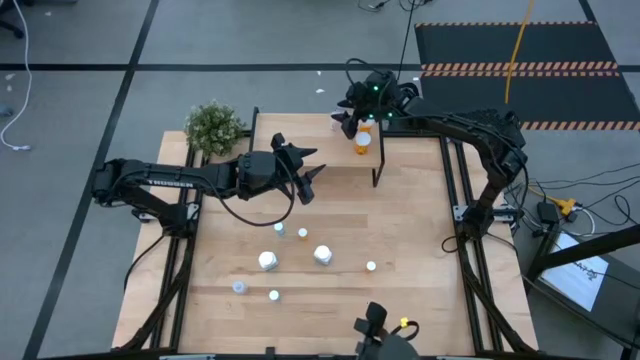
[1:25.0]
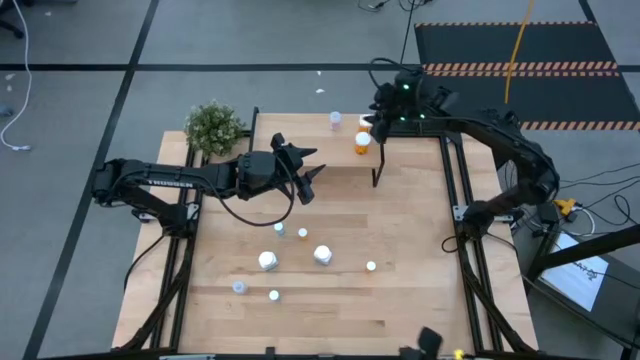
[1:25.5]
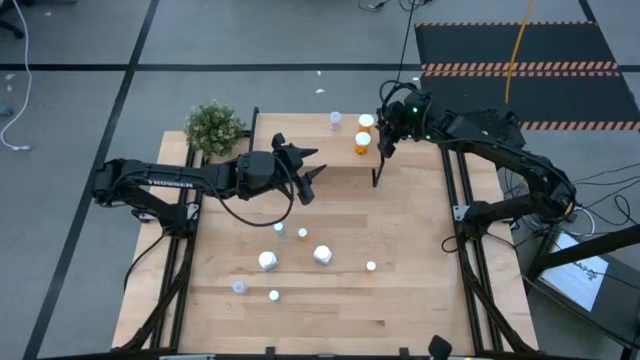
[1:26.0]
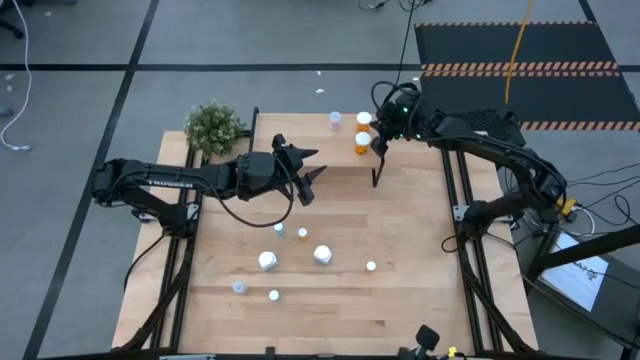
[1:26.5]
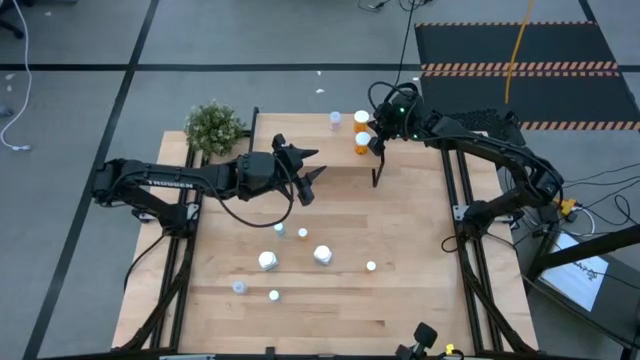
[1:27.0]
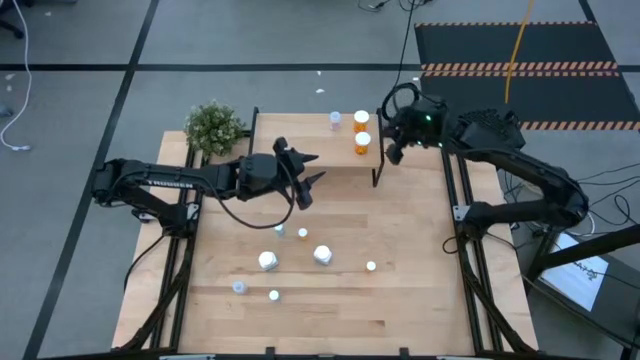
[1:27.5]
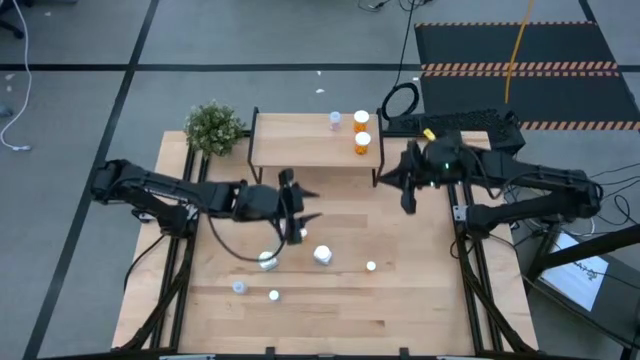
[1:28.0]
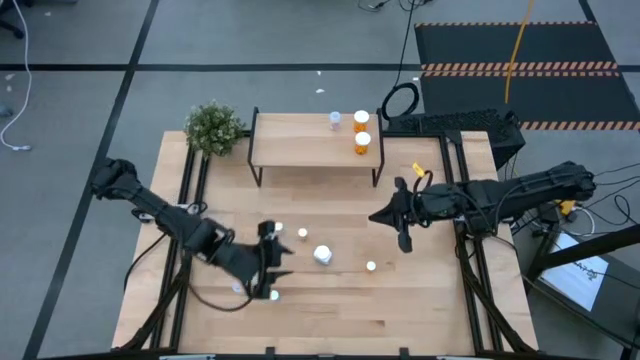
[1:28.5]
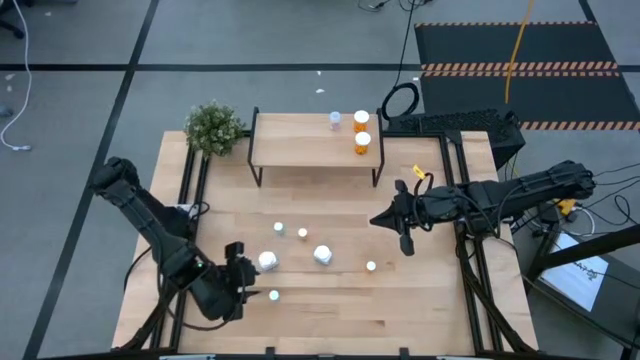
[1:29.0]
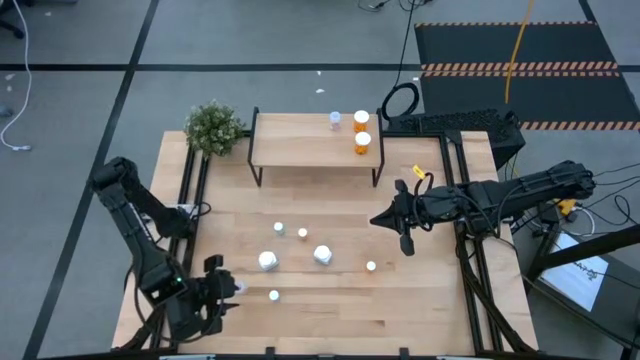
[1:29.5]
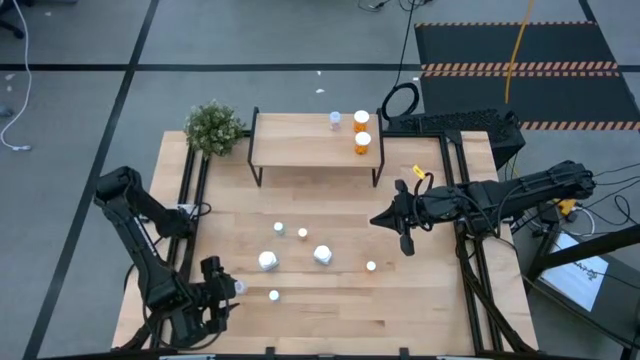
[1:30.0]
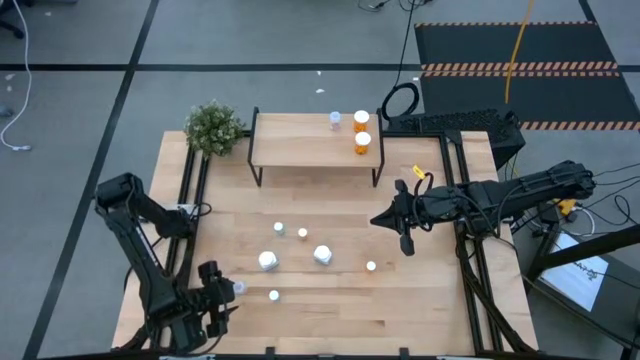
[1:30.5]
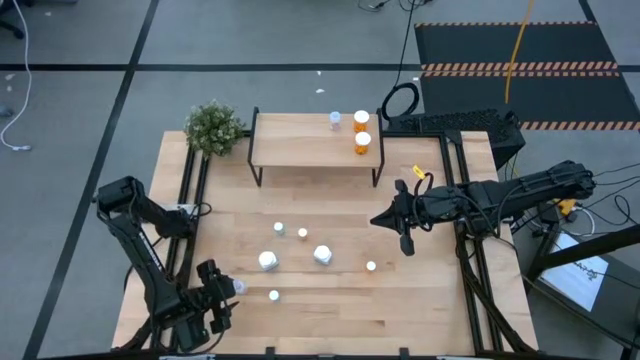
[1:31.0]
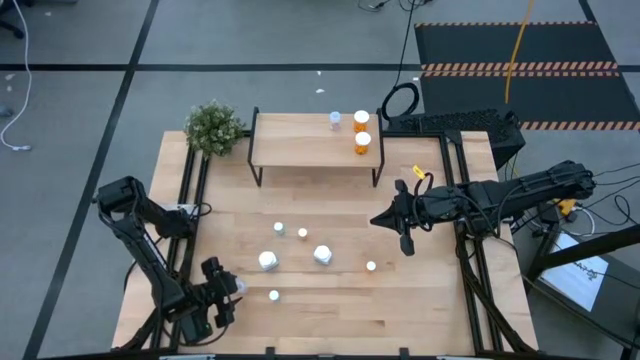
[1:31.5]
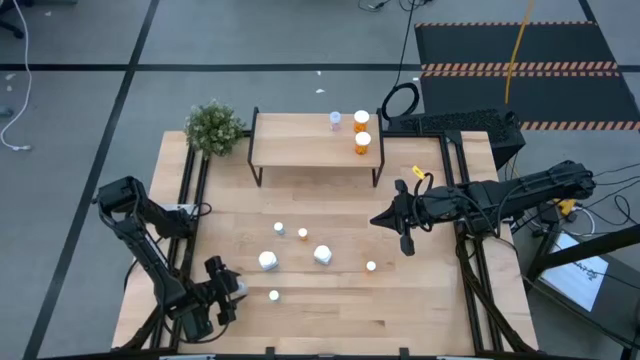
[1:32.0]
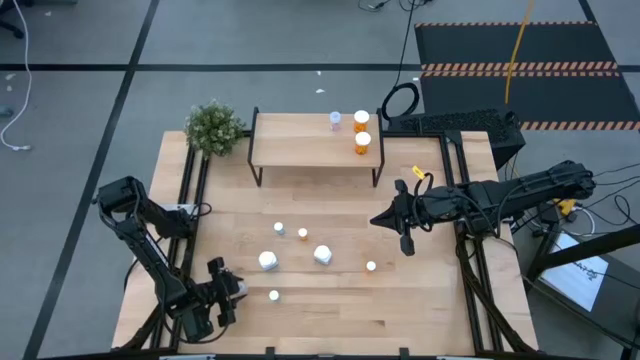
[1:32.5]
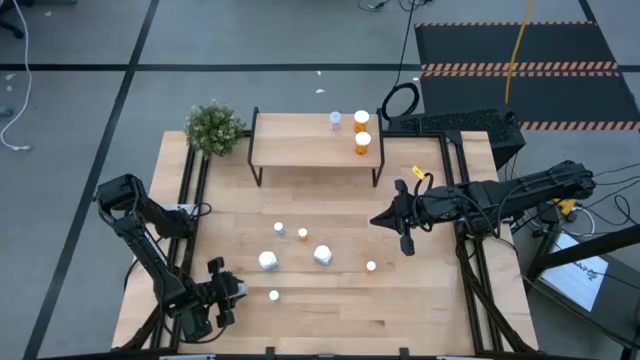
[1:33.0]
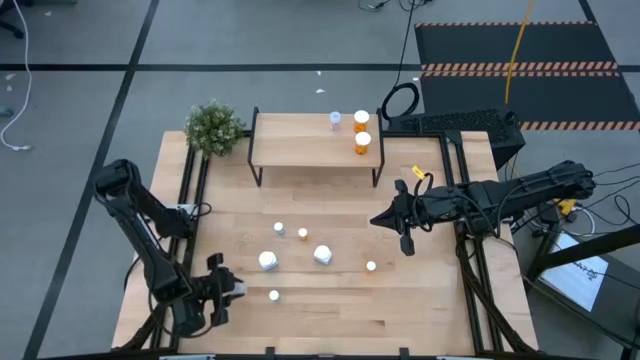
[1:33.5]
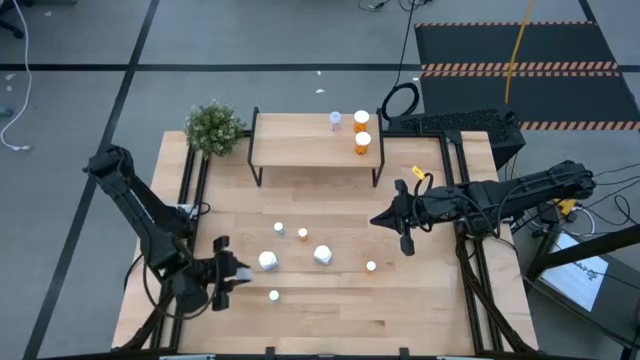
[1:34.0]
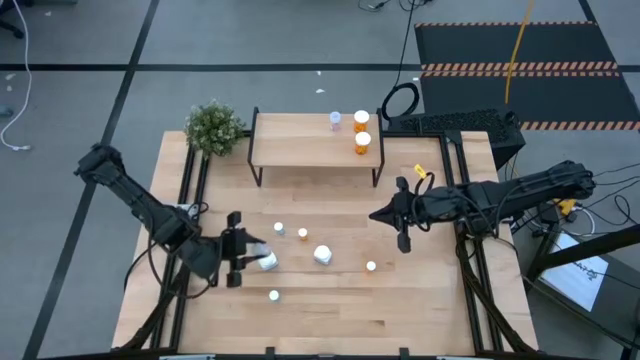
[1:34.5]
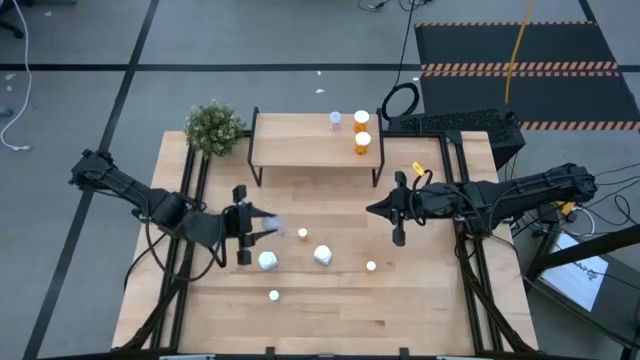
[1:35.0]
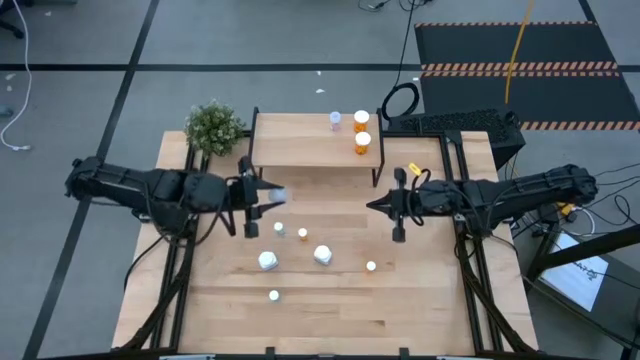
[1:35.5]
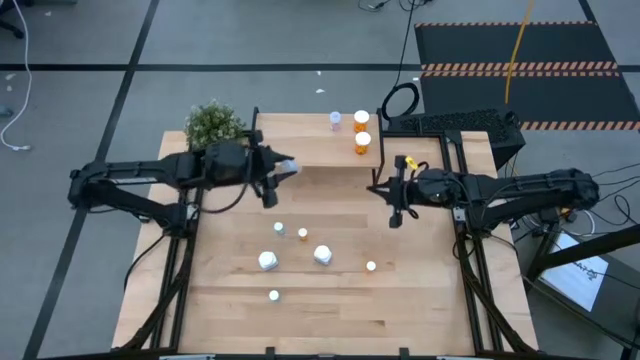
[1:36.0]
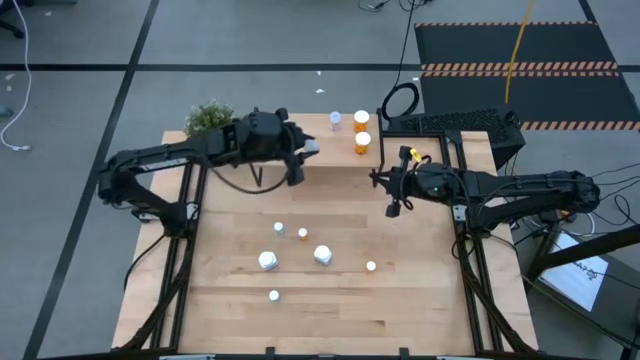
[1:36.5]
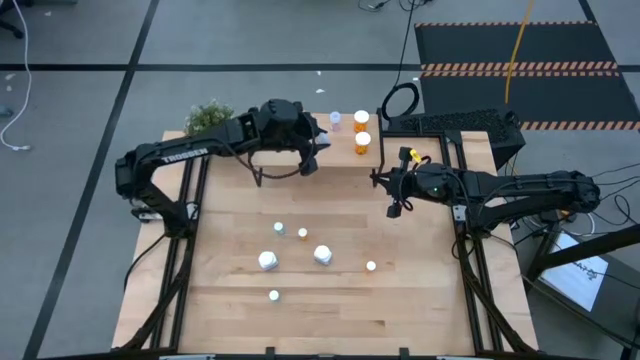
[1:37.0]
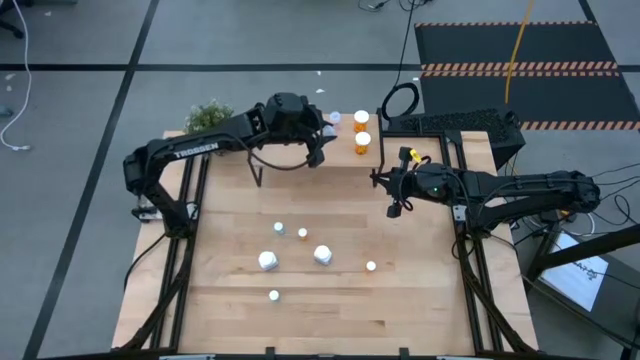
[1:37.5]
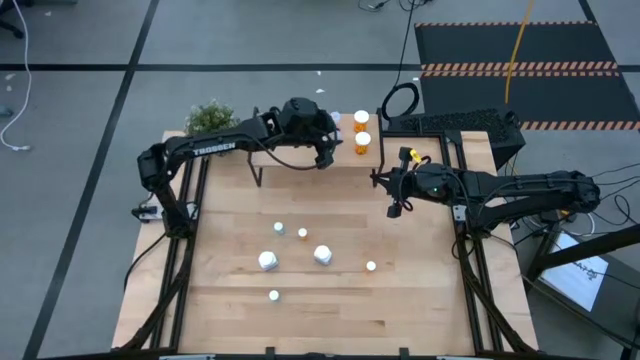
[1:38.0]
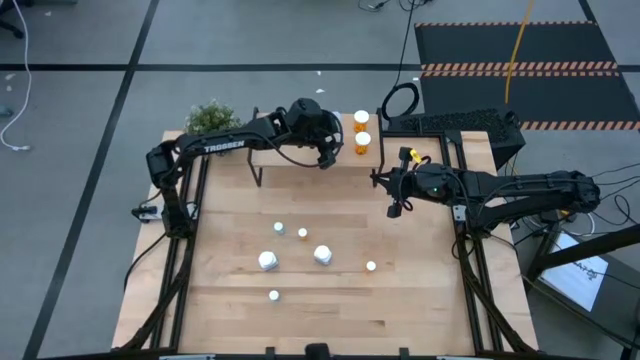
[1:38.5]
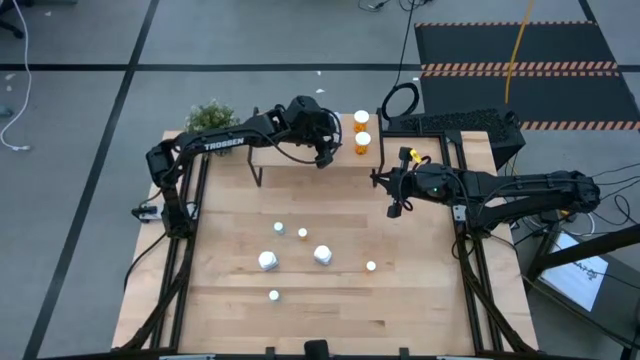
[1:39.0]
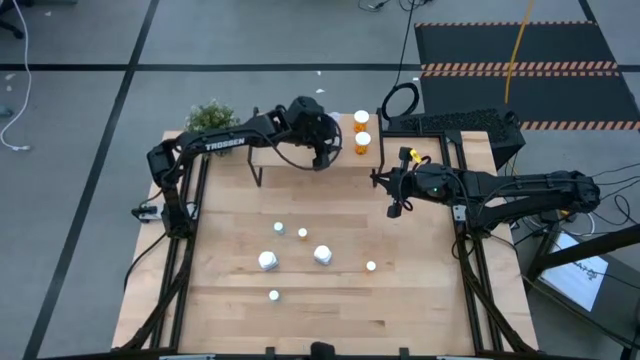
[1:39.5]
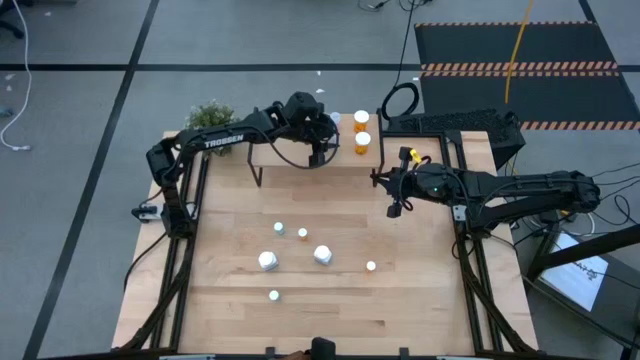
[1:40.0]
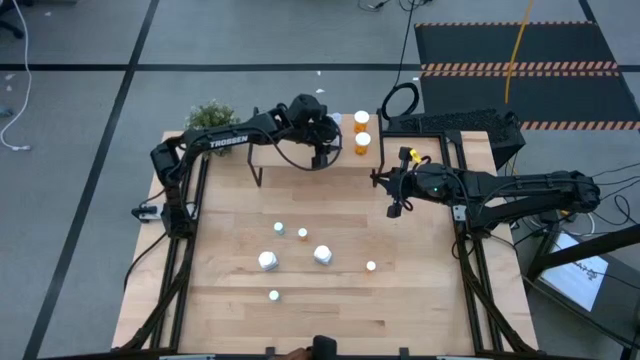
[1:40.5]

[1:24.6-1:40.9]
Task: Pick and place medicine bottles onto shelf by color
Put the transparent pill bottle on the shelf aligned with the transparent pill bottle

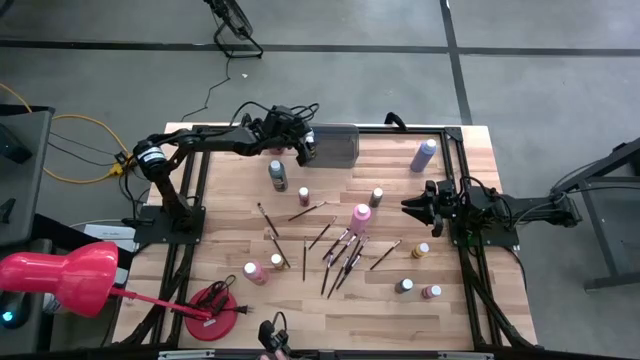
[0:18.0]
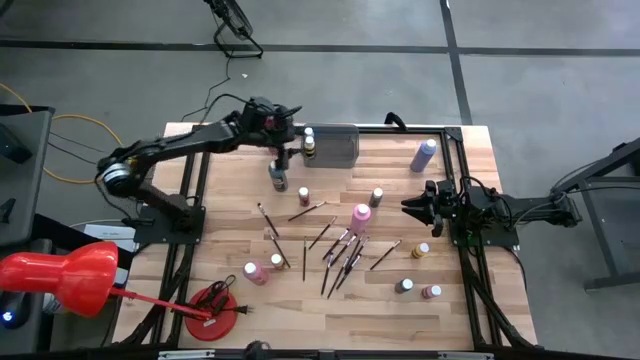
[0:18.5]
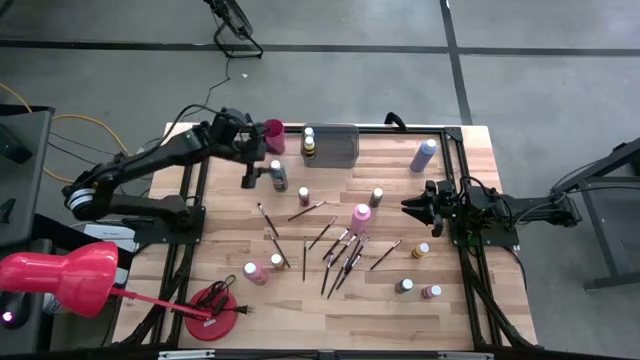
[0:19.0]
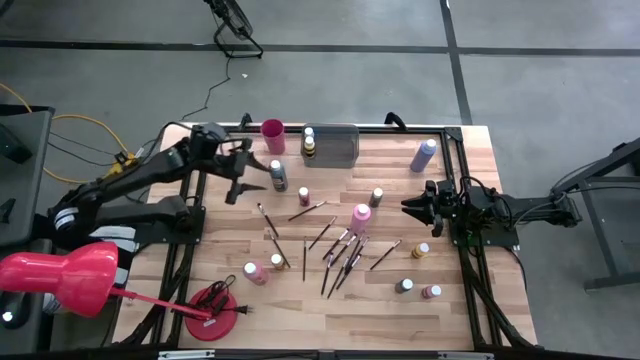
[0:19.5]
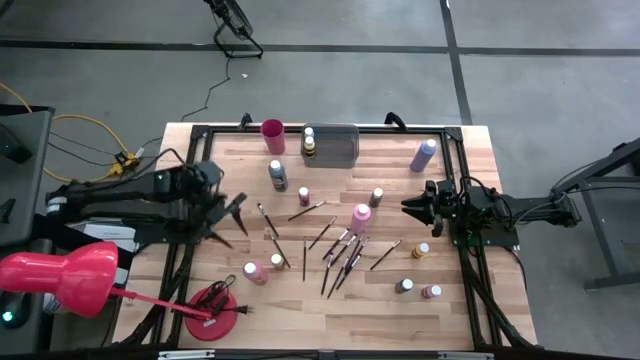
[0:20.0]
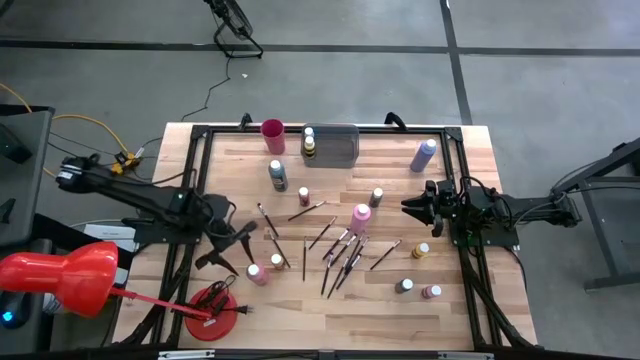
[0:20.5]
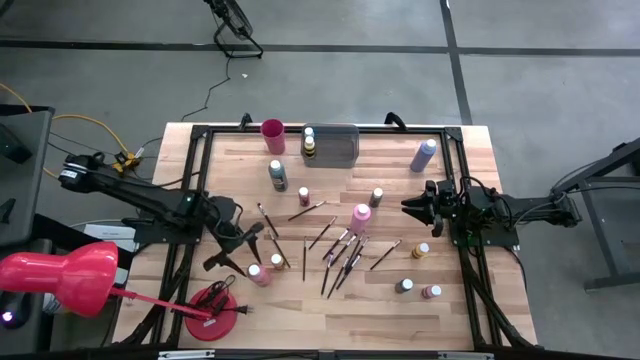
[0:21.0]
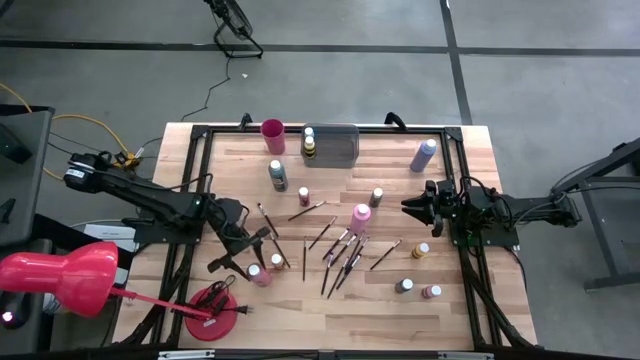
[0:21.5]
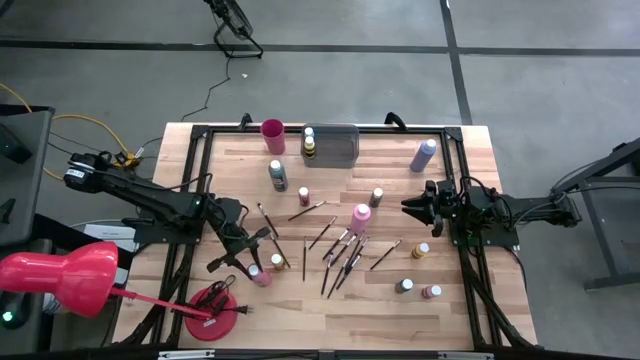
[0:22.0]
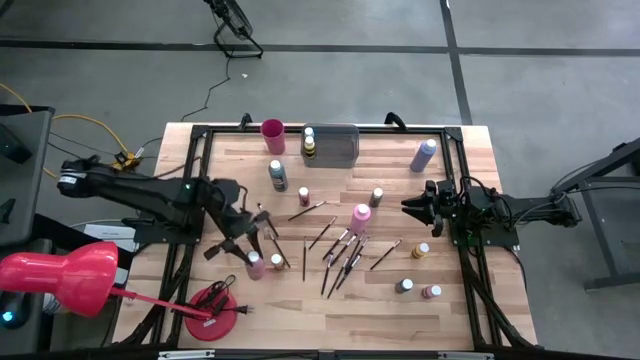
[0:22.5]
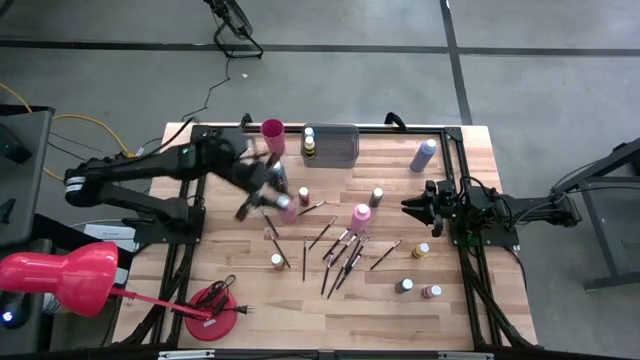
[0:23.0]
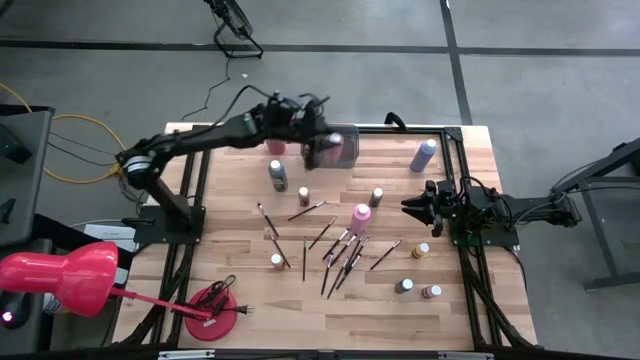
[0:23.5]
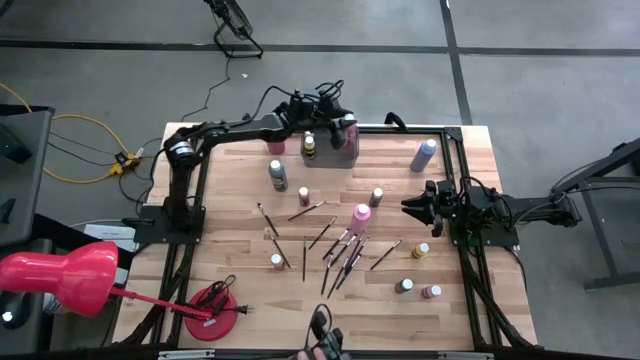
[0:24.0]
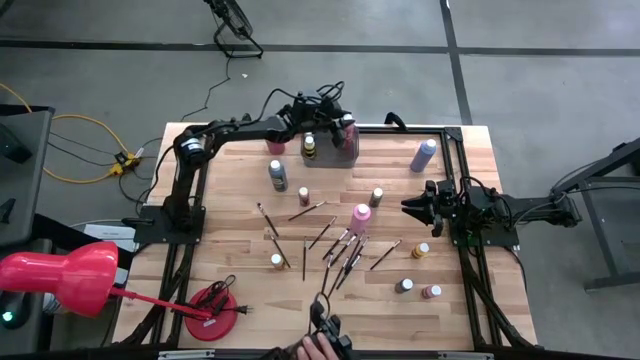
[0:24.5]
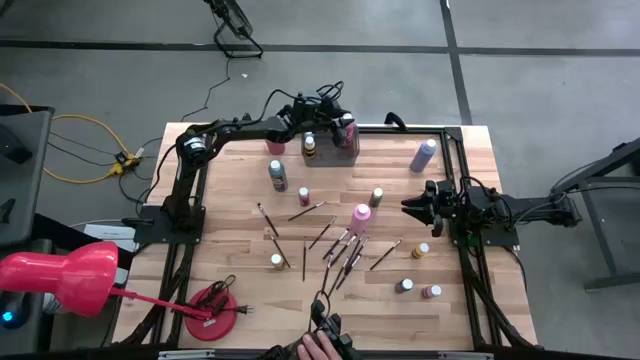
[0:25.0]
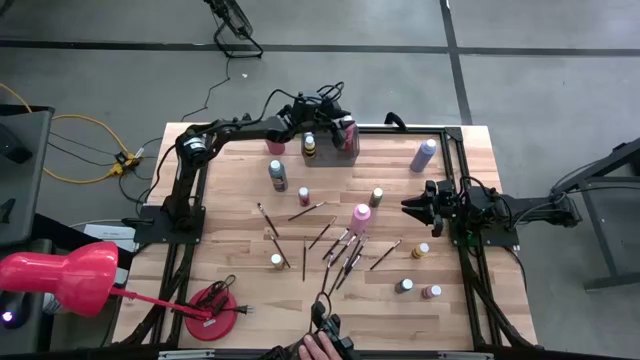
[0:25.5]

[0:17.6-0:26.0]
Task: Pick & Place Paint Supplies
Put the big red paint bottle into the black bin
